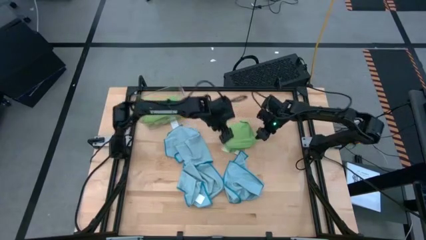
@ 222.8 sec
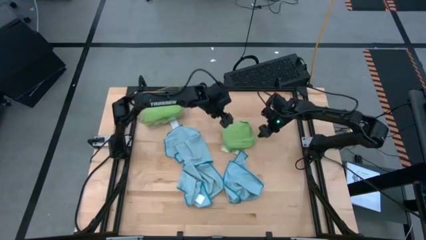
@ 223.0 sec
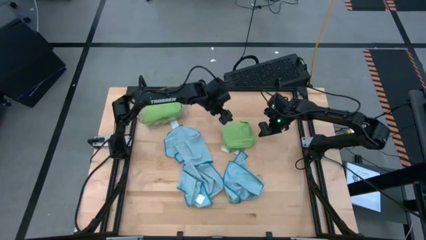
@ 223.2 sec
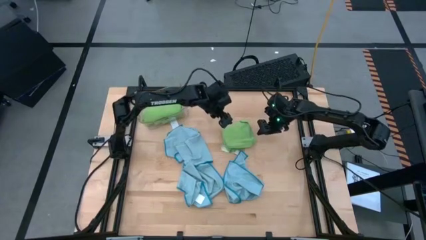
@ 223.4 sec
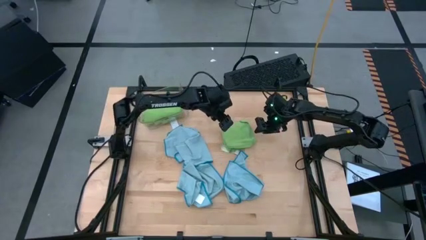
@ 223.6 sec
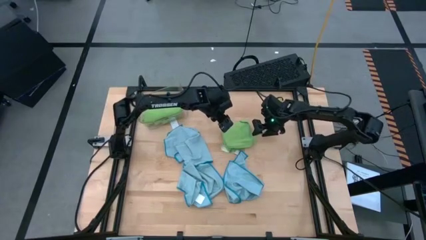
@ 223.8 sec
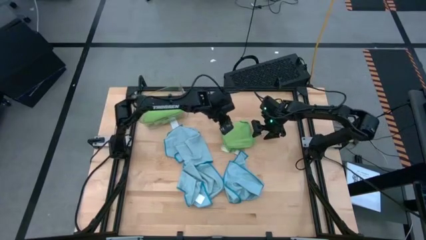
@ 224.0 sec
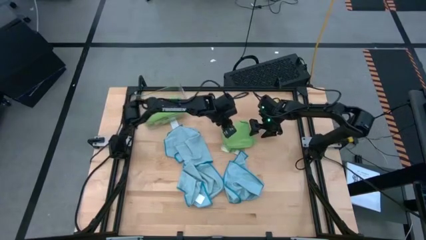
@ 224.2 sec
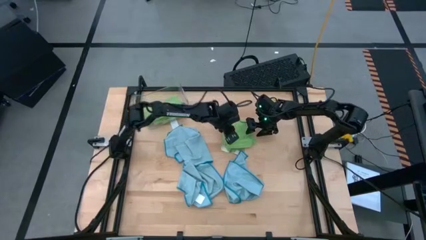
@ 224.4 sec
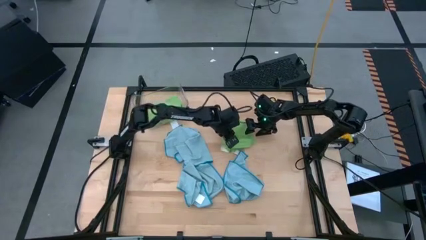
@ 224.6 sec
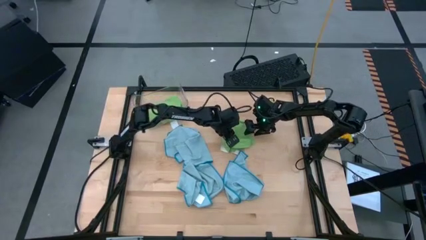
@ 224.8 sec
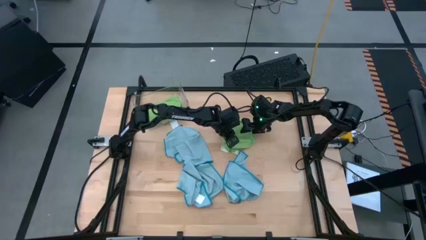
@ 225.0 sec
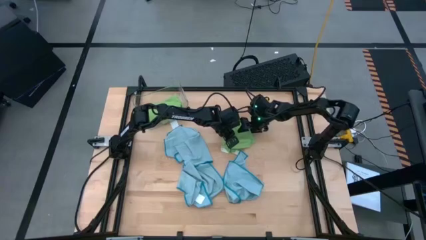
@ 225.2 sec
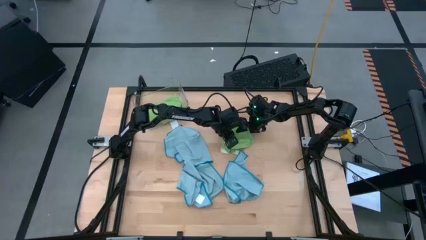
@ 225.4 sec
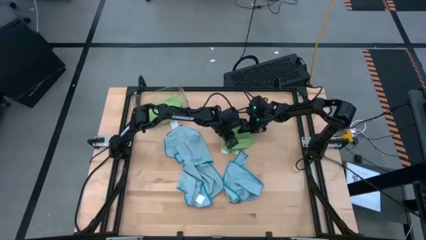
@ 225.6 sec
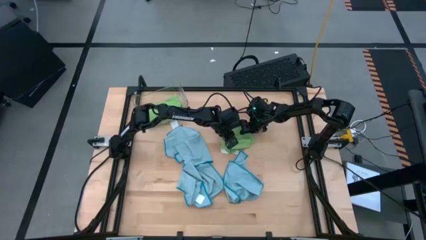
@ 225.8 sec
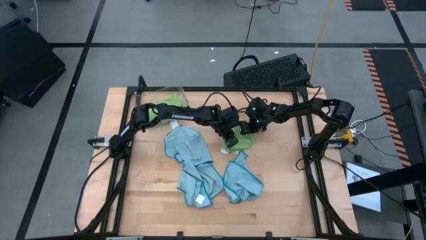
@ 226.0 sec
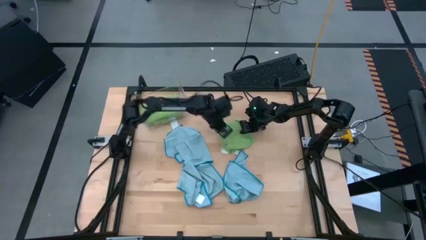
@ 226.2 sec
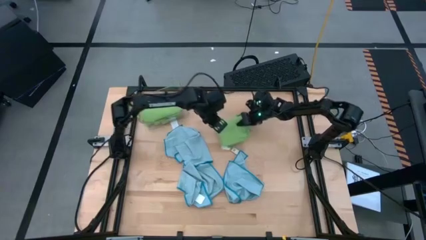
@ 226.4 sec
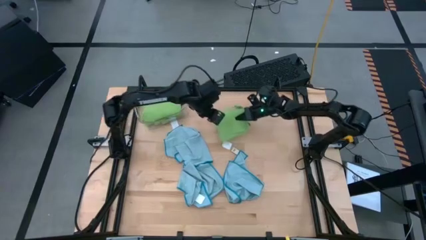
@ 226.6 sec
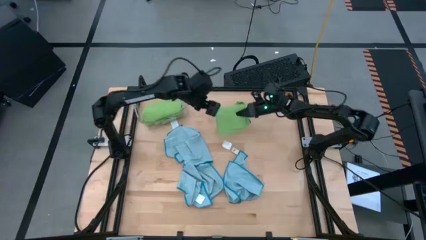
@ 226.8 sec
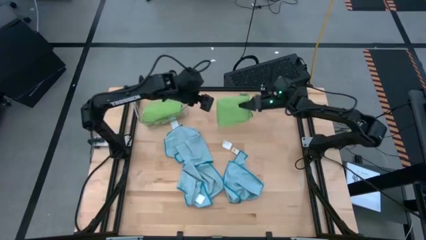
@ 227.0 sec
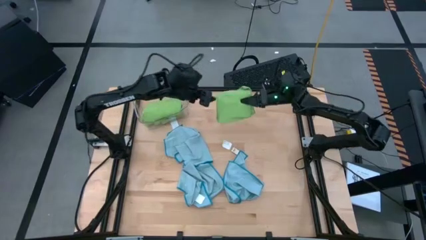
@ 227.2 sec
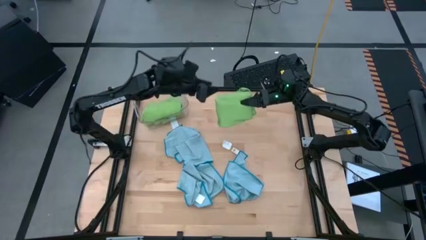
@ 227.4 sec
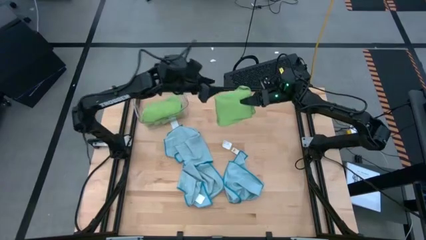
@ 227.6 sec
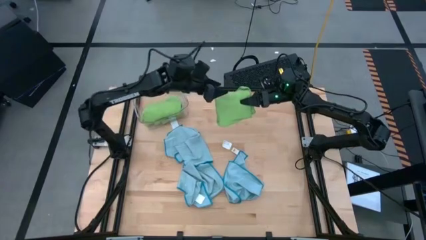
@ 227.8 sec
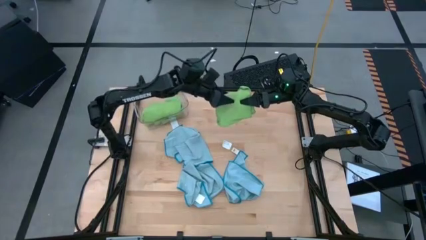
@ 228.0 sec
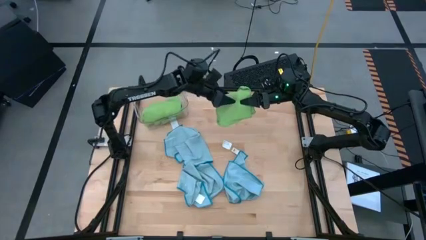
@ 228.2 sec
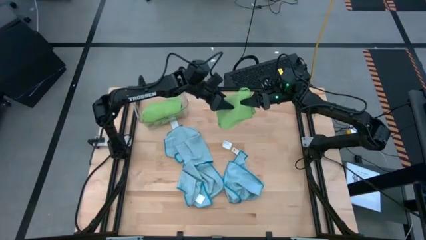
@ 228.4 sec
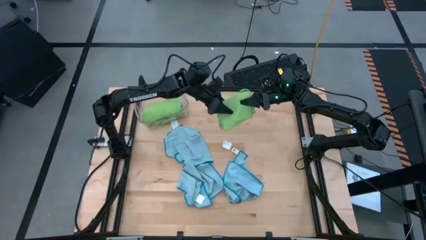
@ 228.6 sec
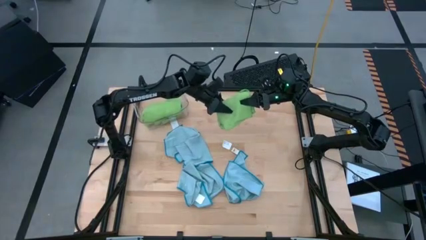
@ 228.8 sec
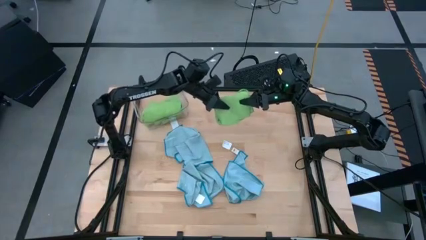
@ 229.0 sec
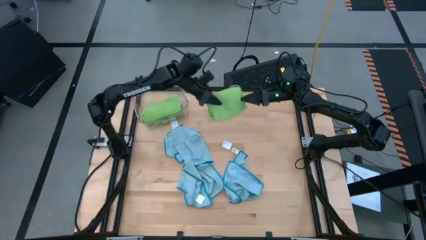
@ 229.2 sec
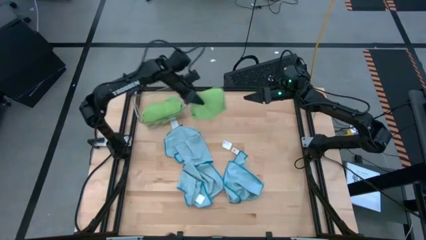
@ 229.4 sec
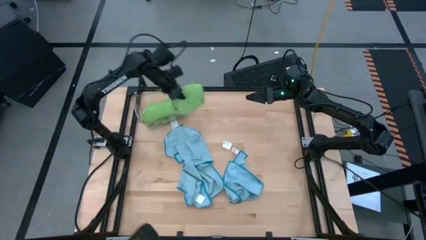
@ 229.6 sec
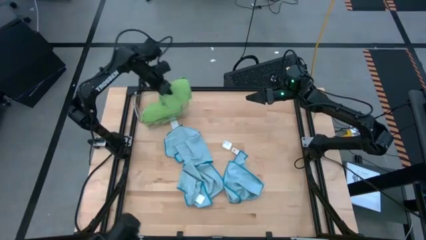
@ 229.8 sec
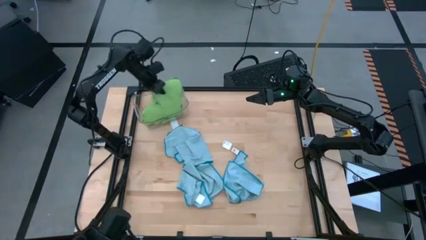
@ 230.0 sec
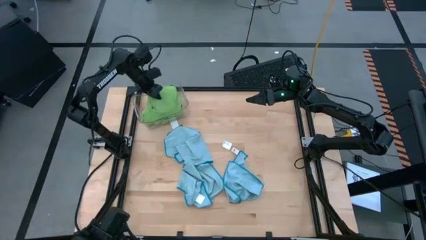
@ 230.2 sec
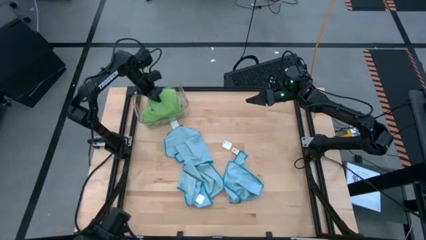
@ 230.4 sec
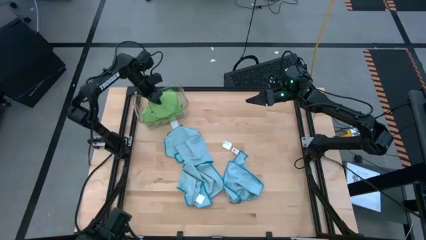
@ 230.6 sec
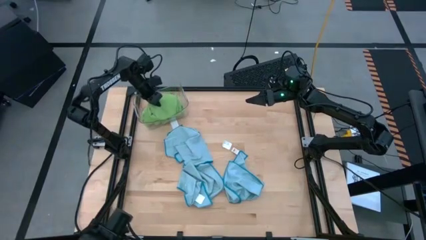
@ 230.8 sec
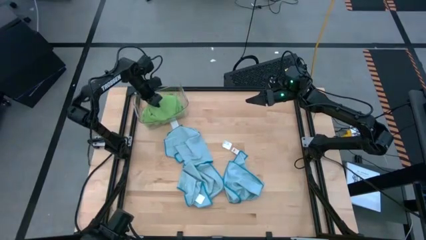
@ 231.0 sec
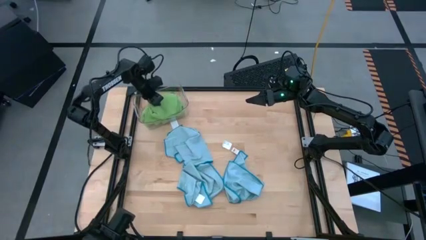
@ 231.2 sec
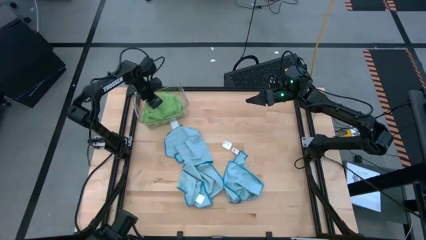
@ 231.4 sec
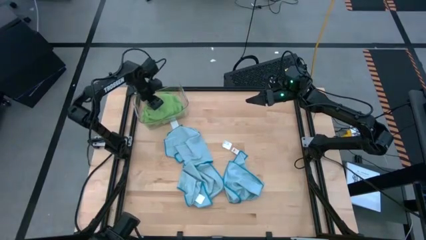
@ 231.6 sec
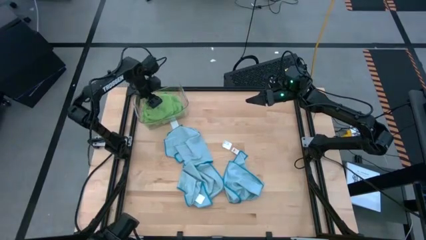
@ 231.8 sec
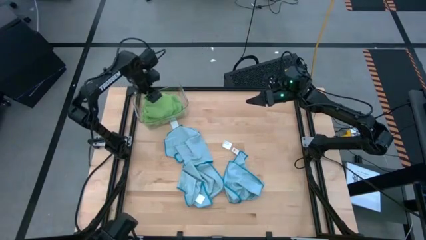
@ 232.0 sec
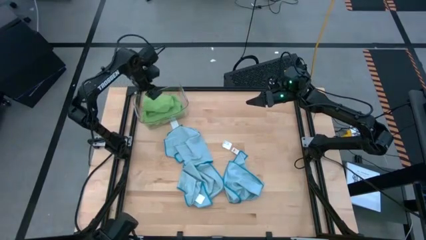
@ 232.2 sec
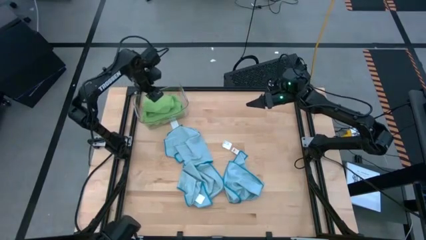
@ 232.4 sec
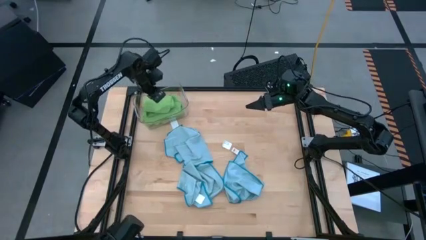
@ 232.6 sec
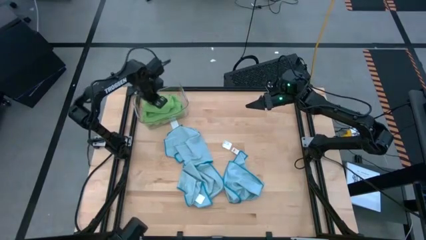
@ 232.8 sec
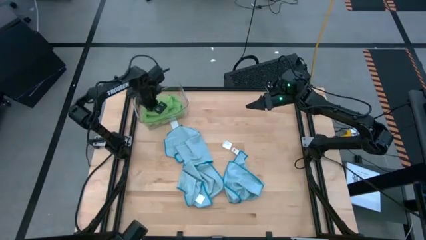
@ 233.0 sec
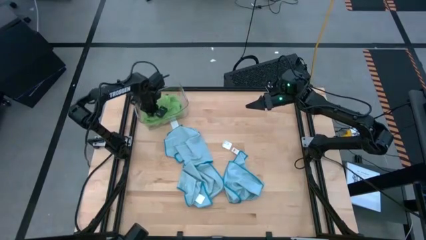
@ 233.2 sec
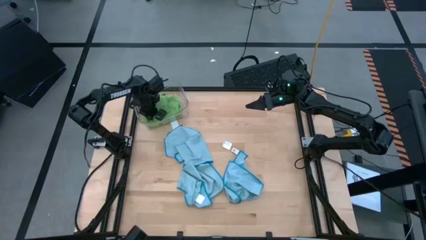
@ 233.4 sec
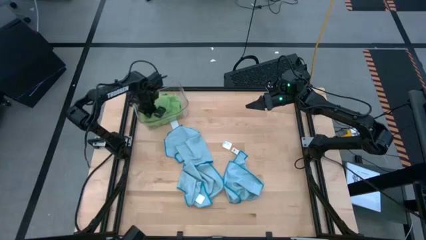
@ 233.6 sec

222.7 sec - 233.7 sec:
Task: Fold microfiber towels
Stack the folded green microfiber cloth on top of the green microfiber cloth on the transparent bin

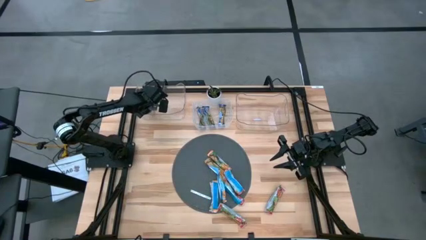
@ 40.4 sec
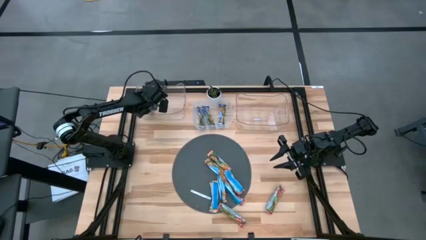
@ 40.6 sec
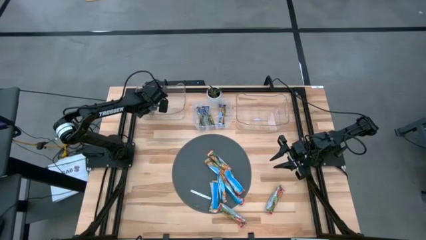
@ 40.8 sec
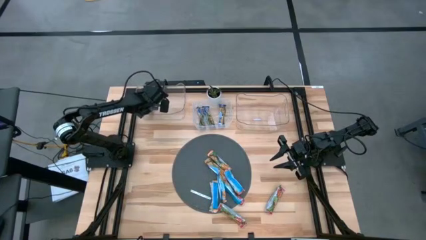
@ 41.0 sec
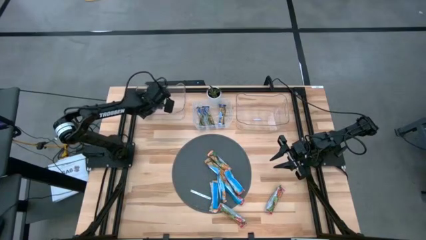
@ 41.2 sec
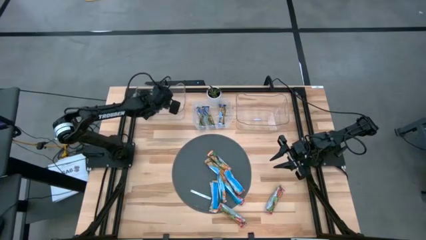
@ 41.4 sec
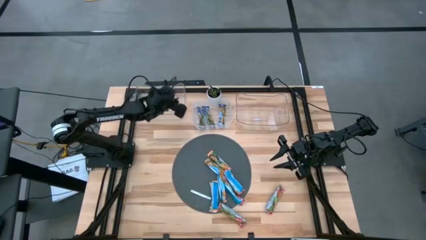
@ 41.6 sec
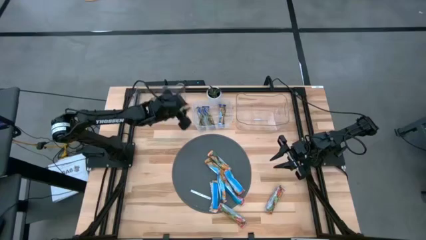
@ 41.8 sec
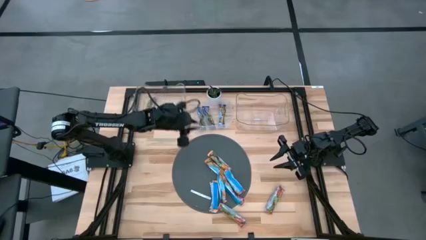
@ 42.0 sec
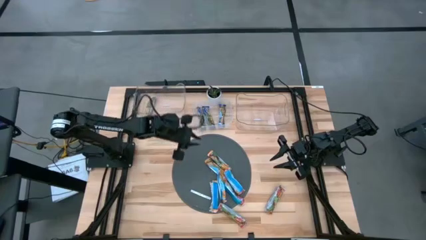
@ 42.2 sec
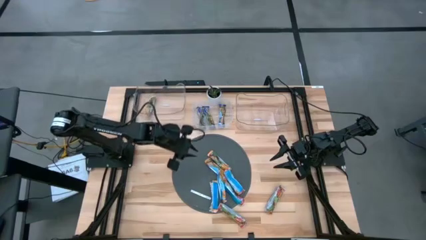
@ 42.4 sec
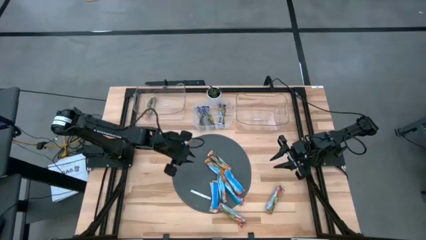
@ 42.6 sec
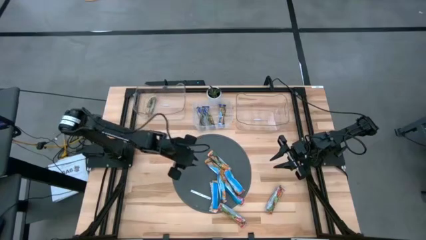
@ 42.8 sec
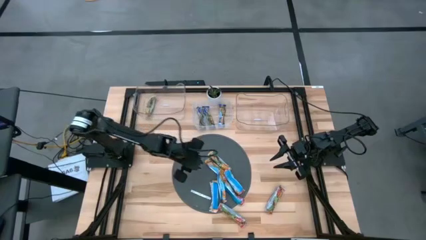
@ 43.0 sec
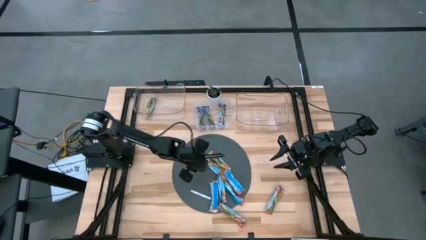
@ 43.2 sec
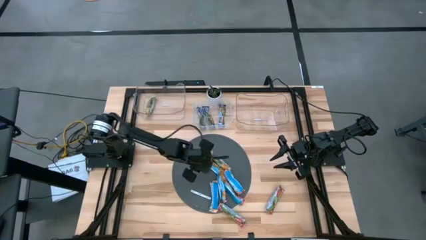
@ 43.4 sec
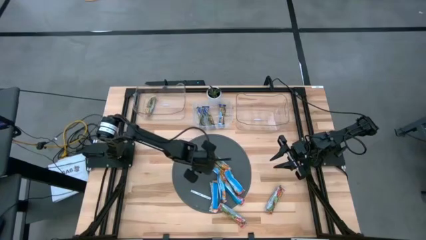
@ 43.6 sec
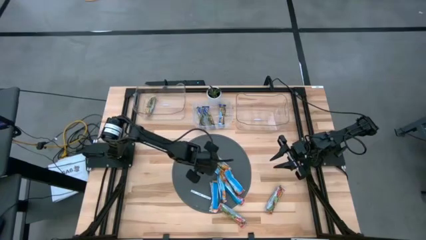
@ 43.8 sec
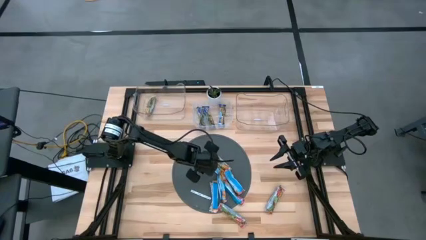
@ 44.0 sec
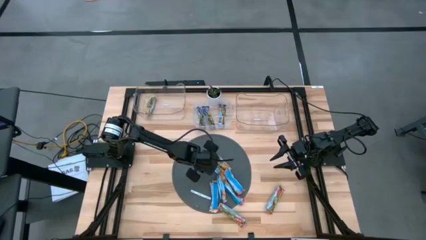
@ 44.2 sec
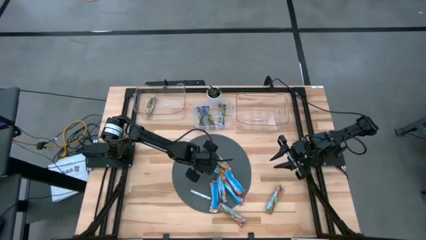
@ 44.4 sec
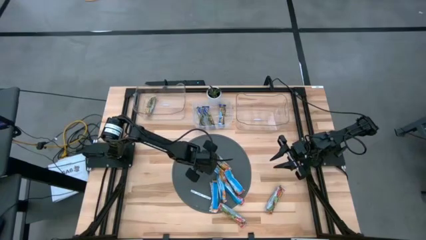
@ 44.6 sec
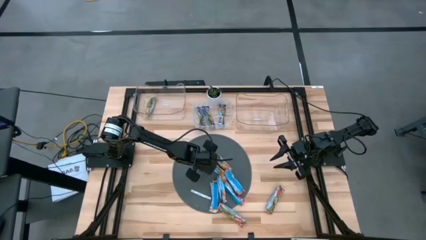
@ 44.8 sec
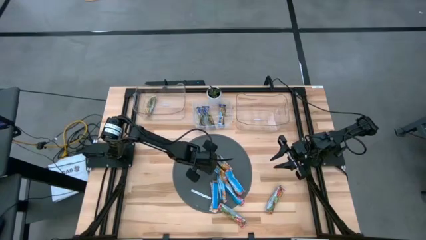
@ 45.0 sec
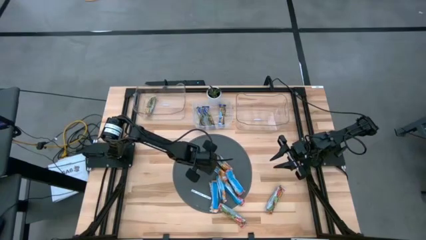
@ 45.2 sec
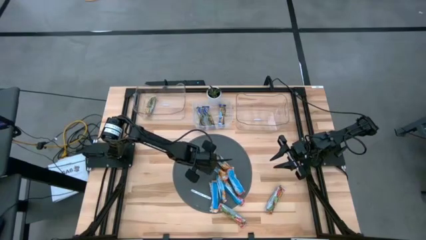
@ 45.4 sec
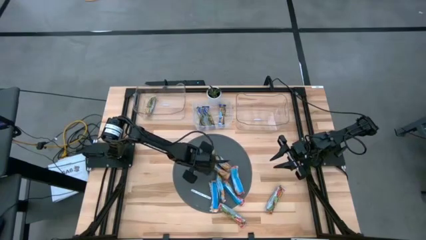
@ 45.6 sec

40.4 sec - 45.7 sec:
Task: Pick and place Granola Bars by type
Put the yellow granola bar into the left transparent bin
